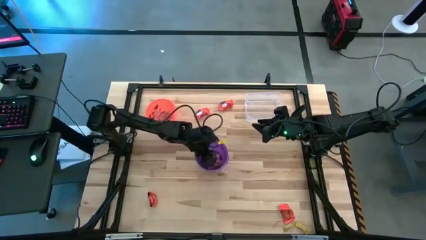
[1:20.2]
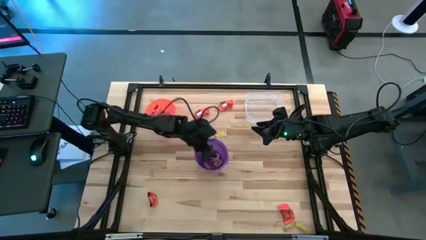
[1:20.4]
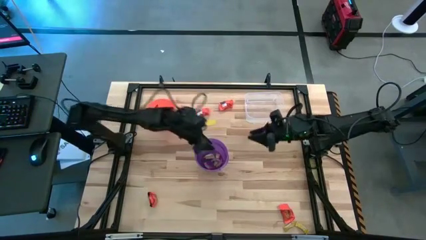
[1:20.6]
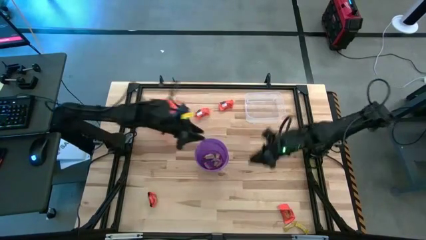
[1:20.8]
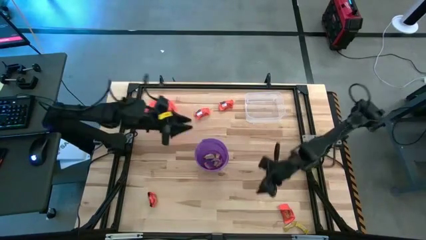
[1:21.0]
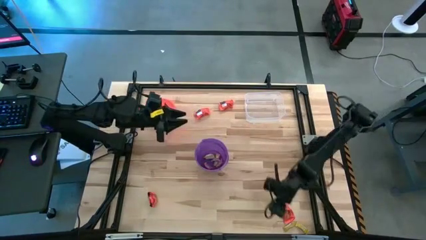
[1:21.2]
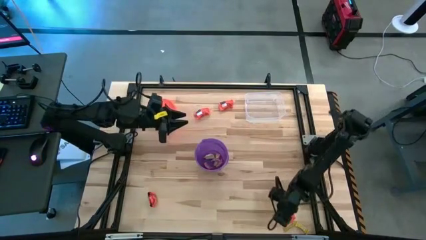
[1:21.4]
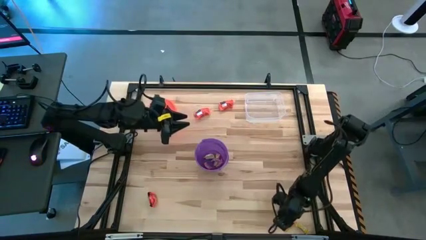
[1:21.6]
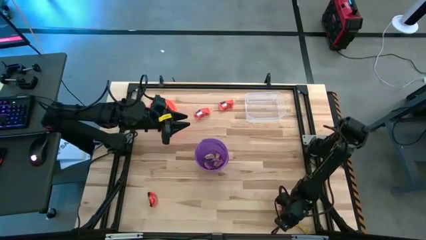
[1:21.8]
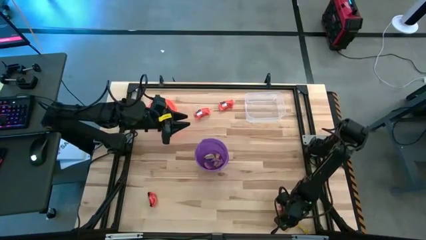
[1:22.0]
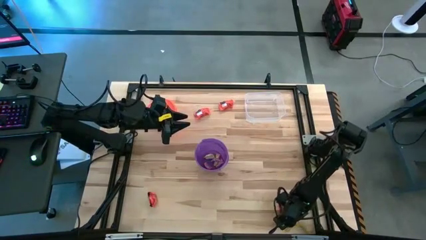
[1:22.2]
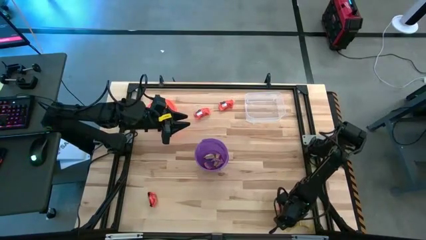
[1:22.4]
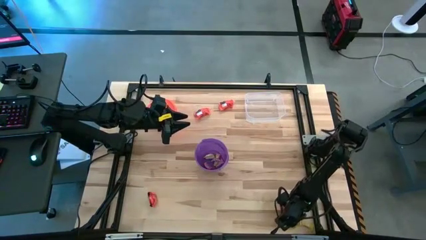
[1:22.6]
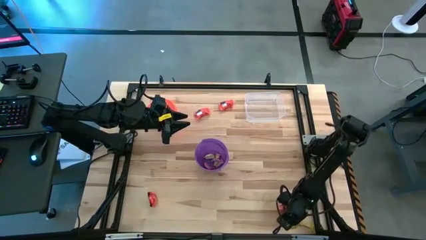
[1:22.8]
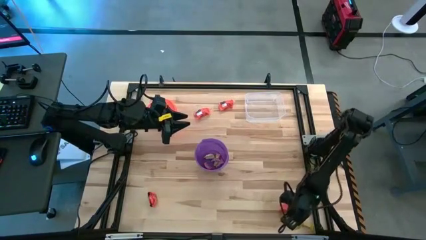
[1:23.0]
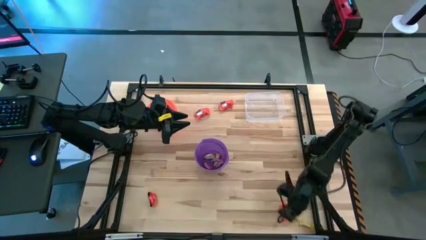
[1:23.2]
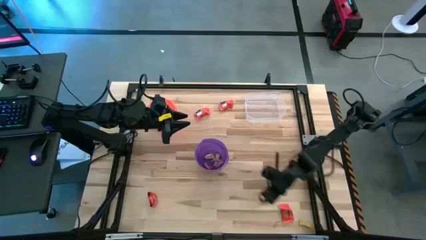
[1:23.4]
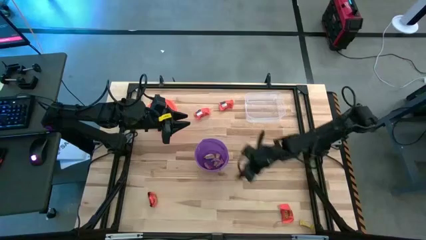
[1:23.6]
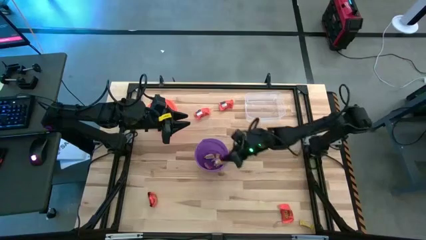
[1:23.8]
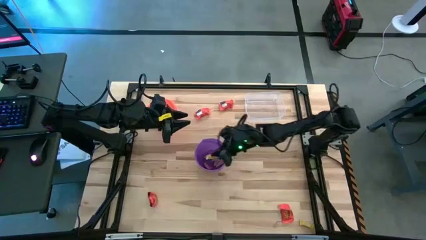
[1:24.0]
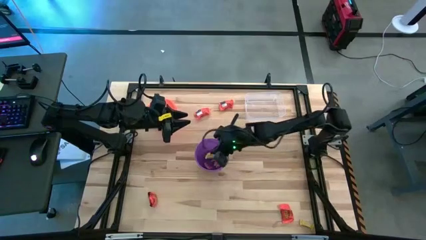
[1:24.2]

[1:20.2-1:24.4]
Task: Sort candy by brand, put in halloween buckets
Put the yellow candy into the purple bucket

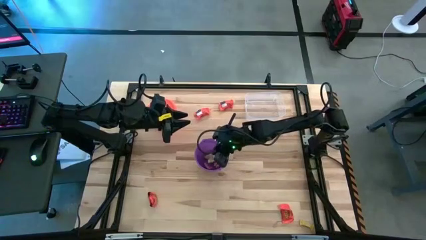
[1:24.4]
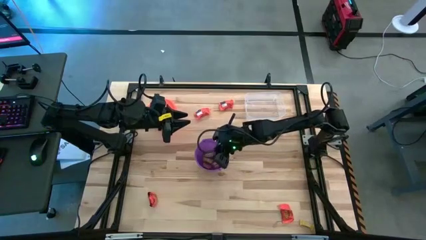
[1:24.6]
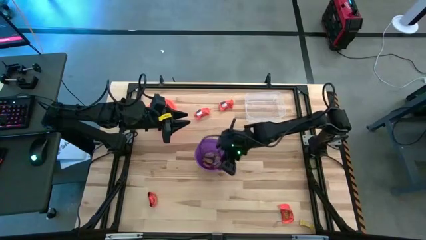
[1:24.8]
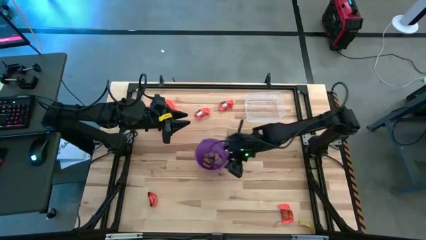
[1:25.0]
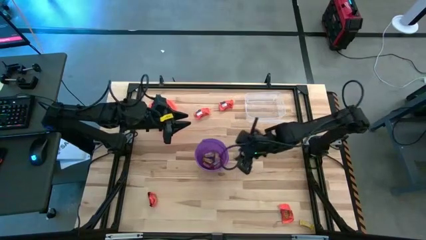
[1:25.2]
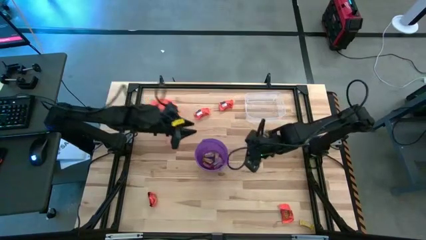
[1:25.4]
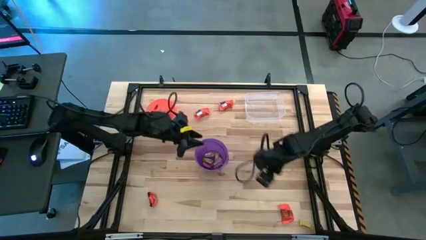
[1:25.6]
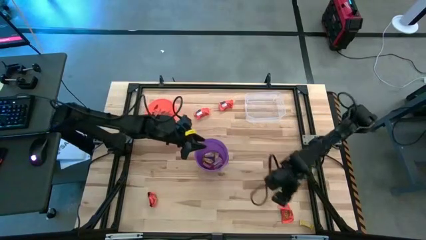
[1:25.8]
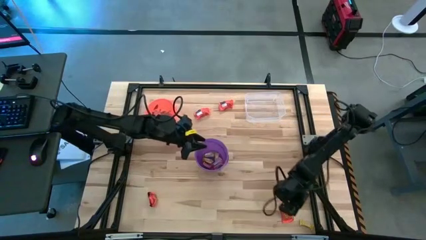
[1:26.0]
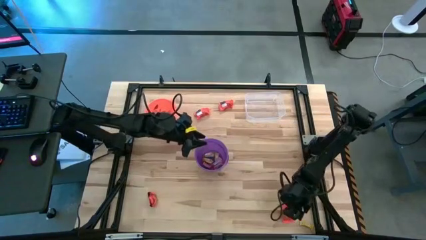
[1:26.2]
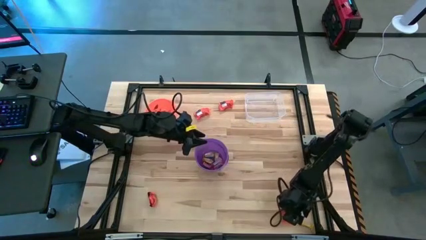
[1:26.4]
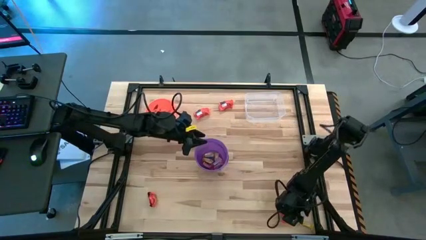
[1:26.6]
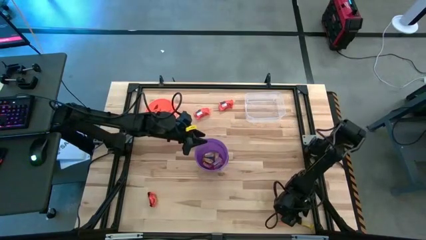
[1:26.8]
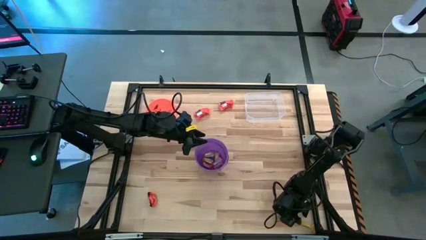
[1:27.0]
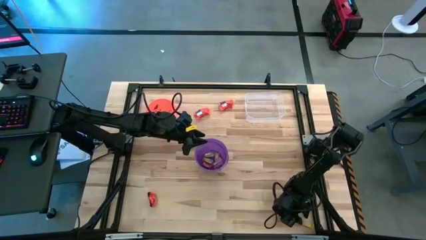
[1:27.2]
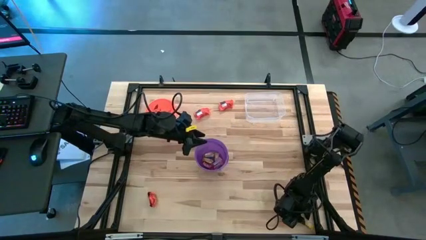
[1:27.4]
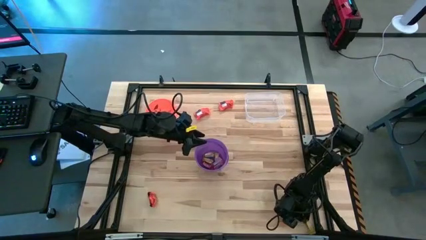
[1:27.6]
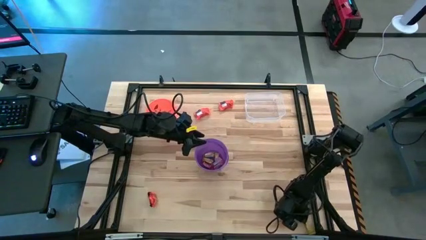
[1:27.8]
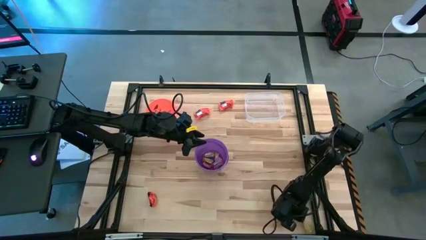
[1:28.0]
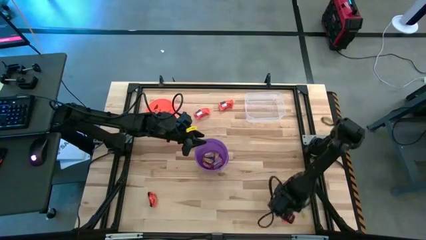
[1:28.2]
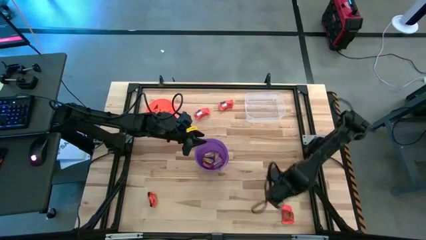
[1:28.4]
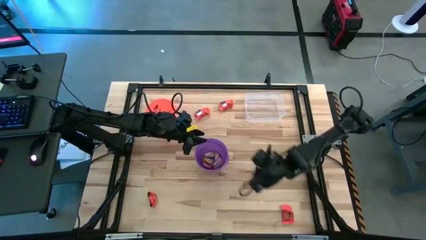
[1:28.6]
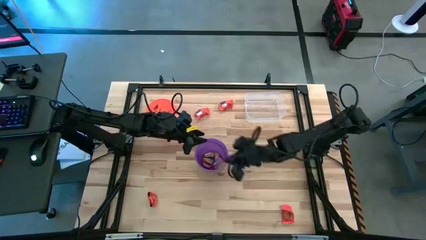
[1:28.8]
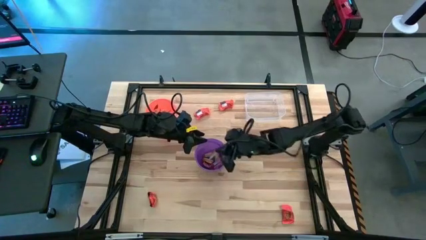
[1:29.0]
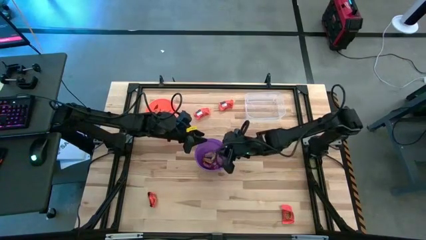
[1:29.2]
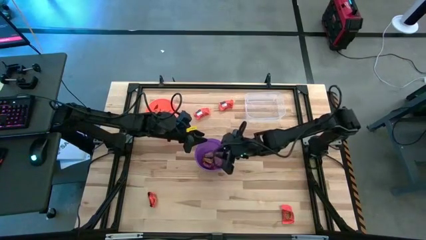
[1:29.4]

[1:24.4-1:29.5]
Put the yellow candy into the purple bucket

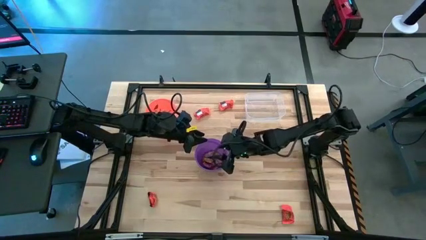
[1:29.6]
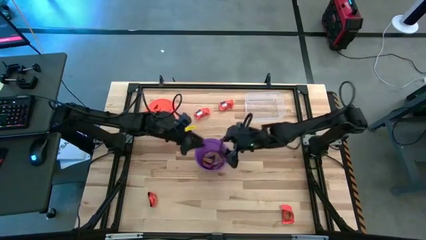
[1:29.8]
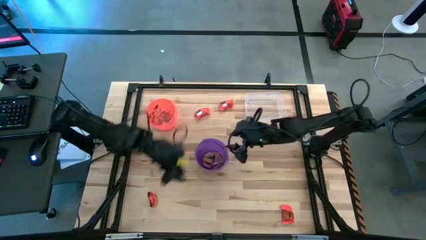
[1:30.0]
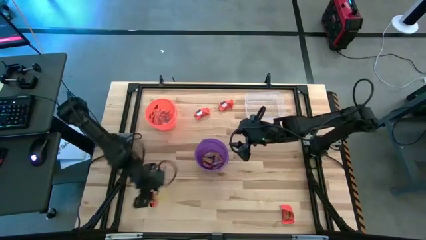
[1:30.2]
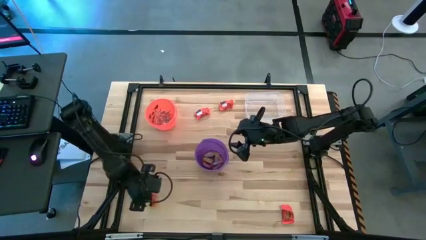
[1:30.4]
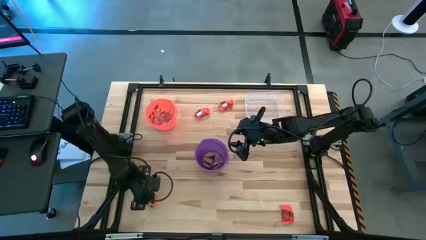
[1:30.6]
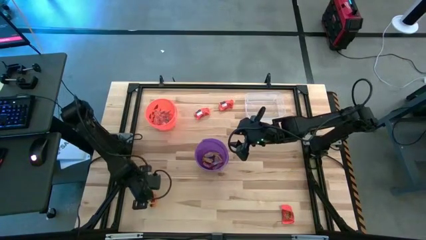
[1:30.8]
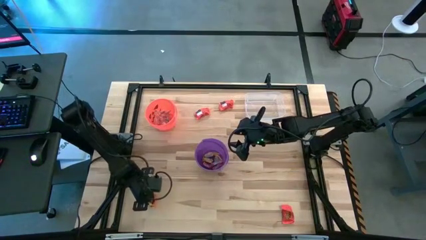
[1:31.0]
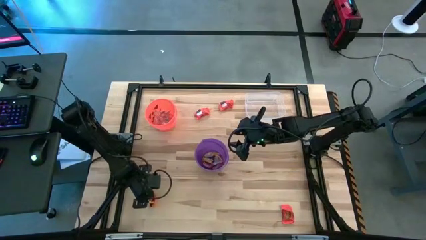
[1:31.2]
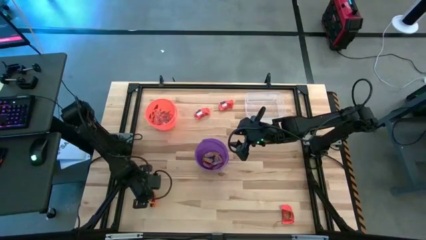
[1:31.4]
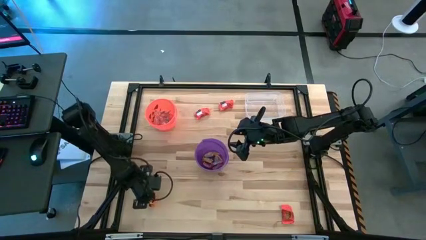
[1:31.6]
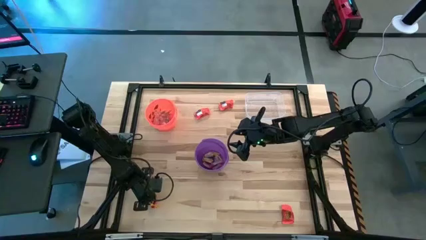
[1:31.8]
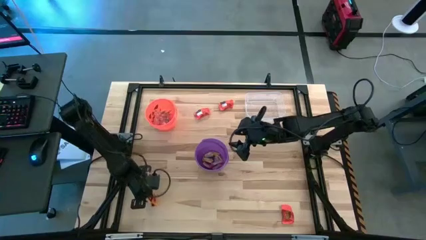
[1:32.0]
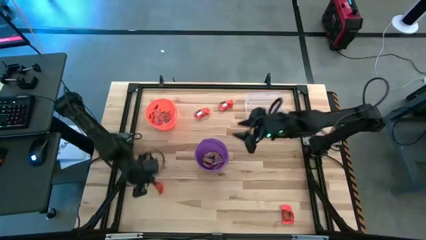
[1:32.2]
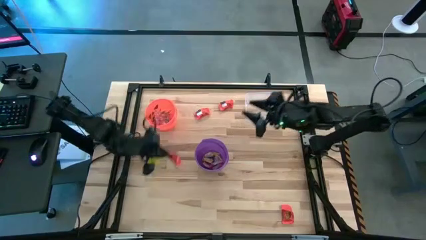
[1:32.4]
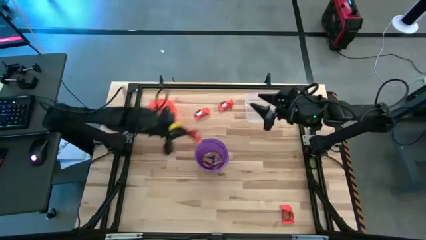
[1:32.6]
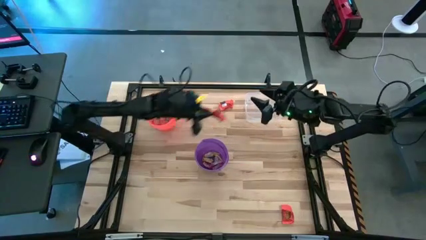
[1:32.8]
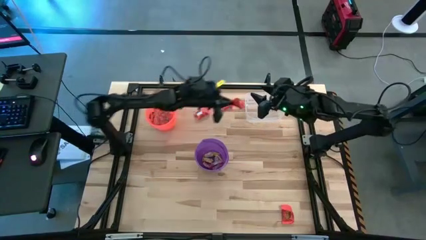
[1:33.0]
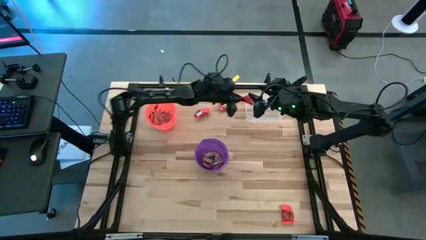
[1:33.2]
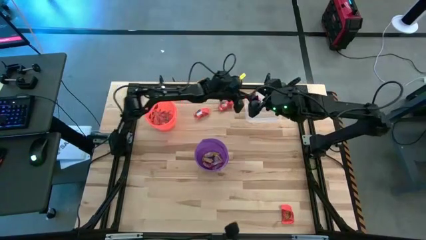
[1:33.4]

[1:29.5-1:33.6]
Put the orange chocolate into the transparent bin

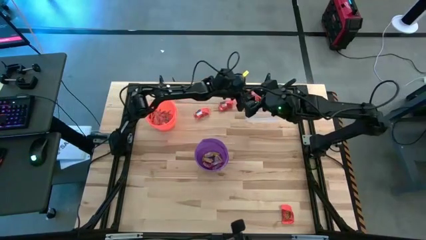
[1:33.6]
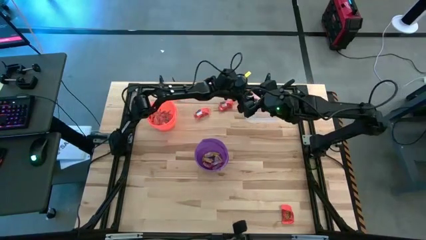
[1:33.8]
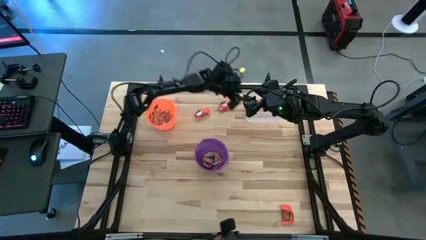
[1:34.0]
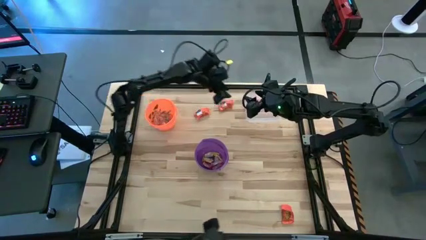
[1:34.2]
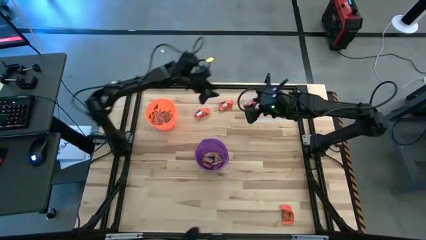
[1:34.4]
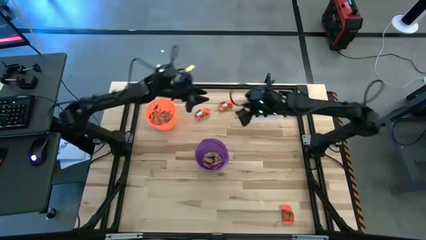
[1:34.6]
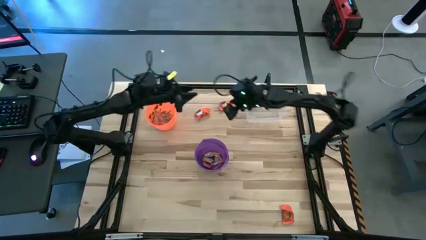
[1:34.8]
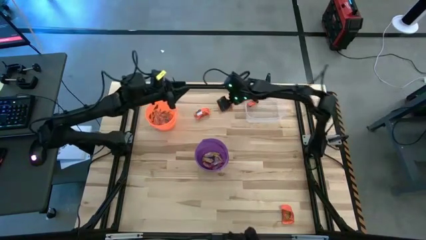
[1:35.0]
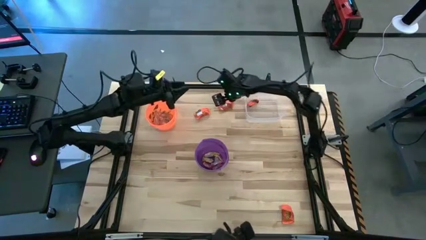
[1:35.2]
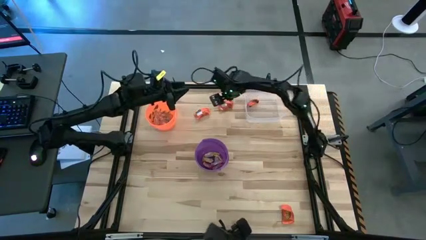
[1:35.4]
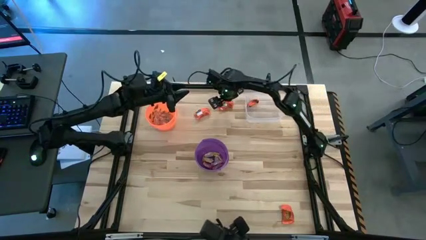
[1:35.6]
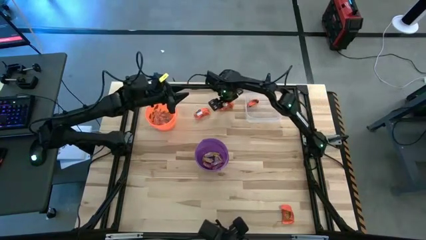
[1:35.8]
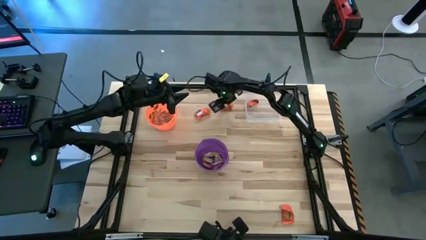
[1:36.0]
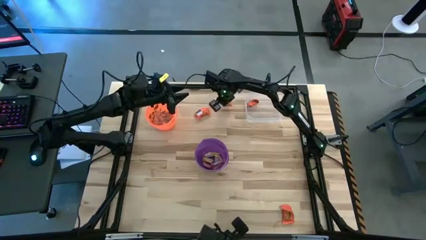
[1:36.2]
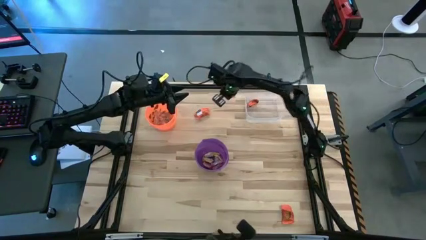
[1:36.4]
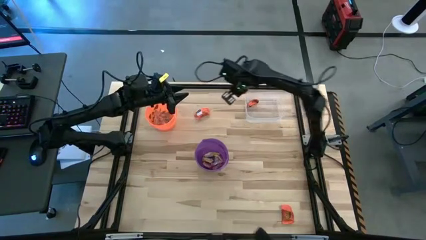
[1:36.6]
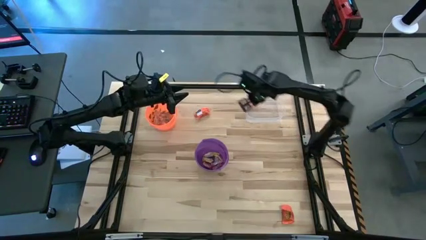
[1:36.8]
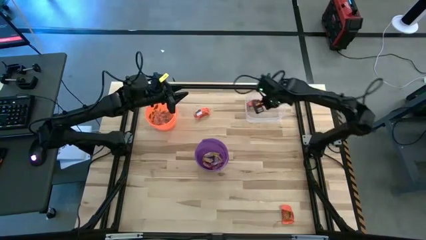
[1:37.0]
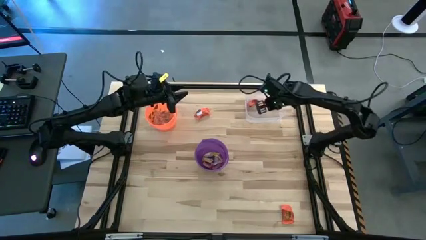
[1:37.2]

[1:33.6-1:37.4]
Put the orange chocolate into the transparent bin
